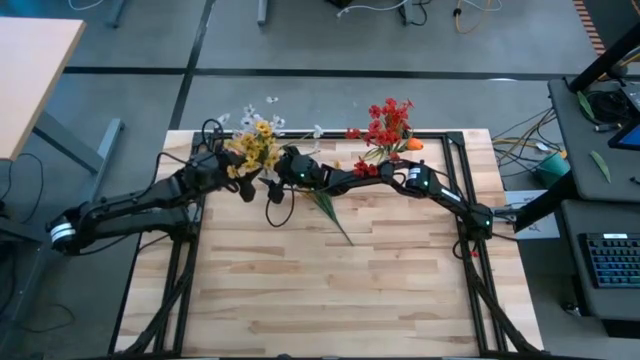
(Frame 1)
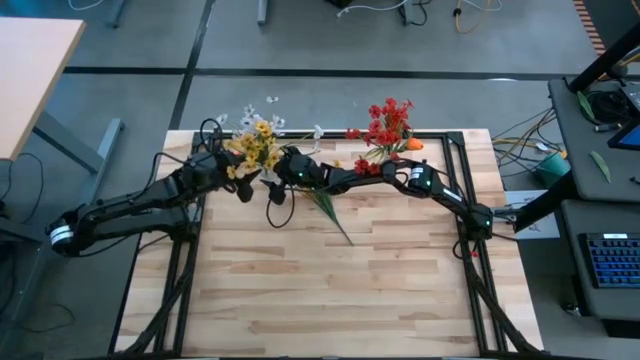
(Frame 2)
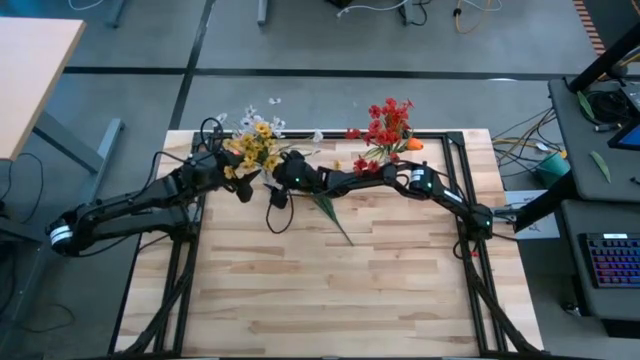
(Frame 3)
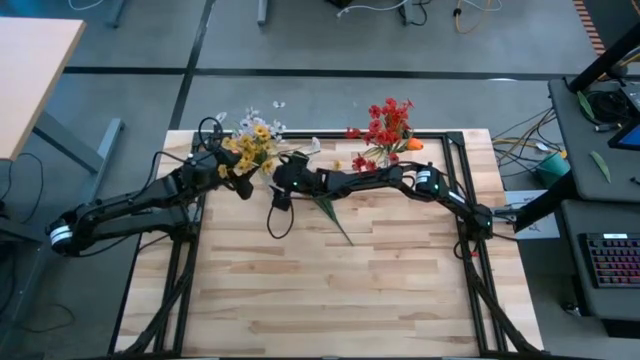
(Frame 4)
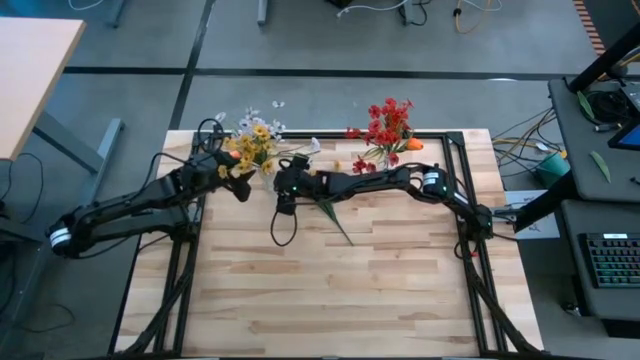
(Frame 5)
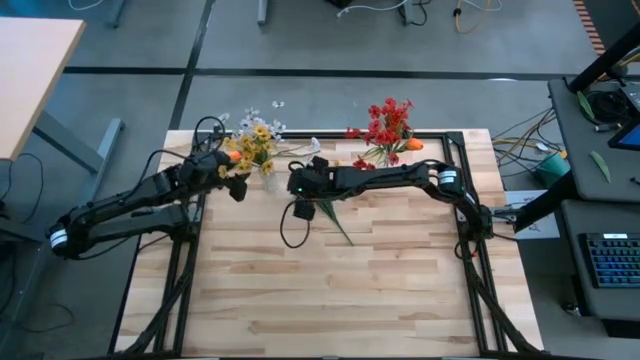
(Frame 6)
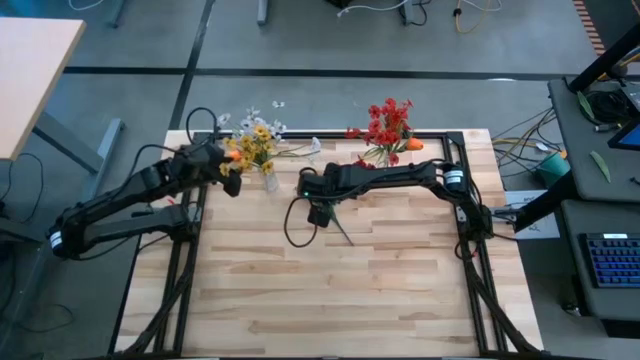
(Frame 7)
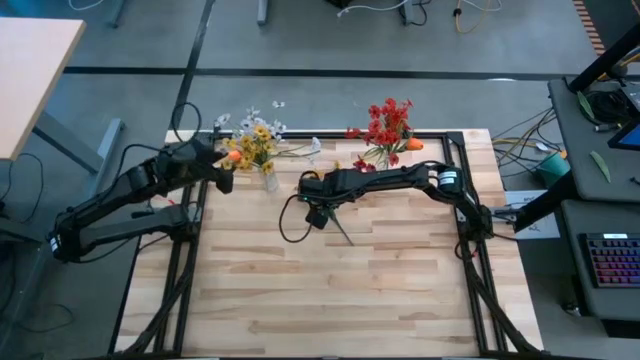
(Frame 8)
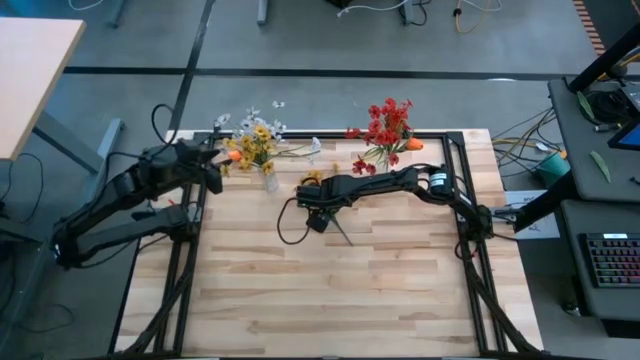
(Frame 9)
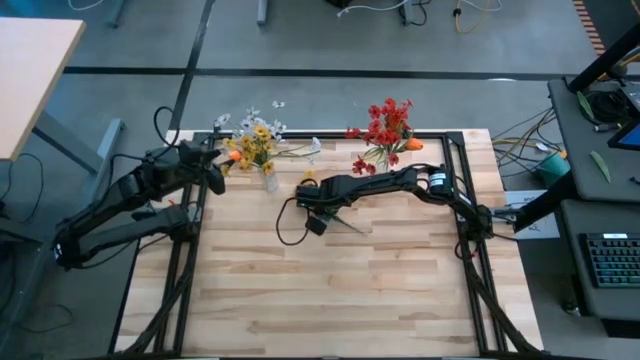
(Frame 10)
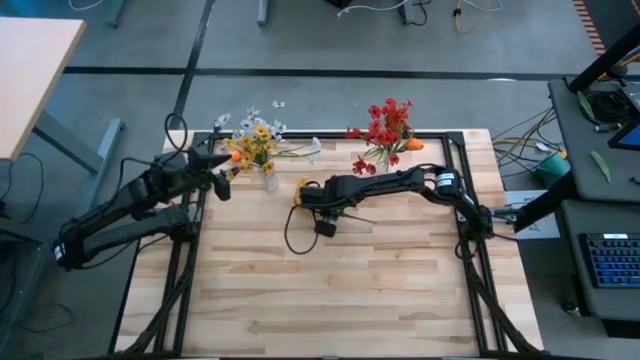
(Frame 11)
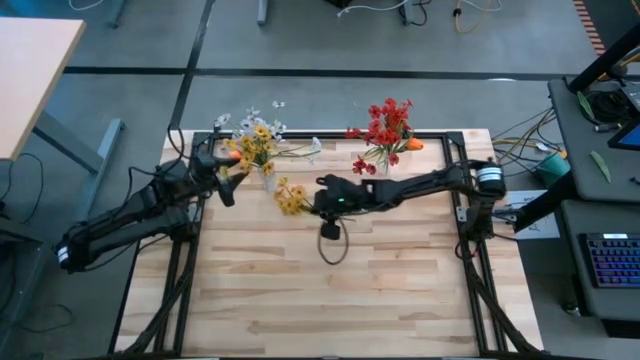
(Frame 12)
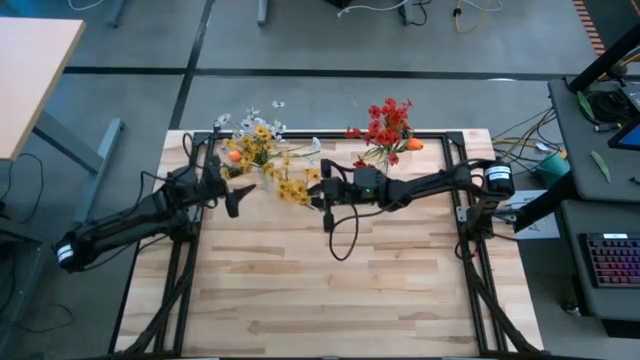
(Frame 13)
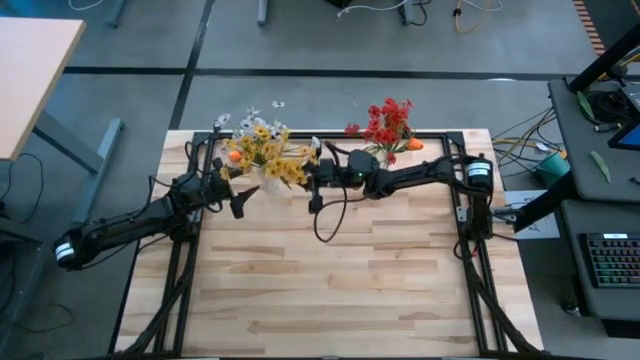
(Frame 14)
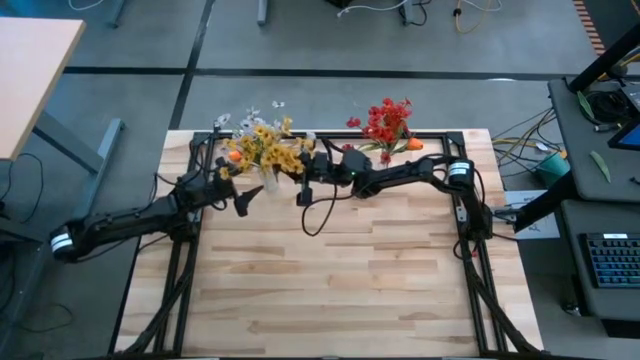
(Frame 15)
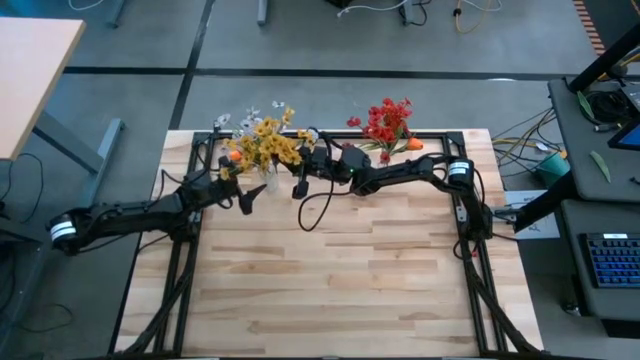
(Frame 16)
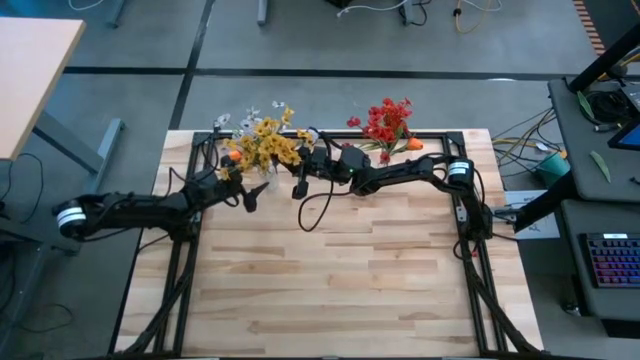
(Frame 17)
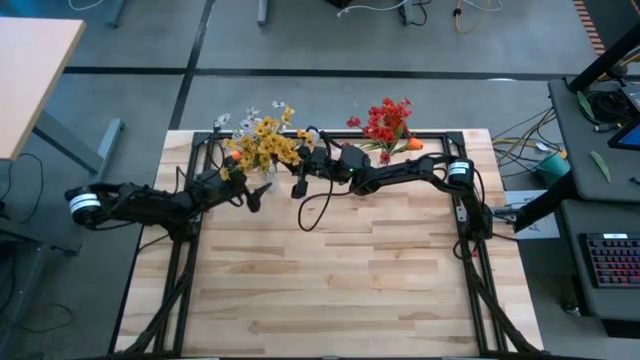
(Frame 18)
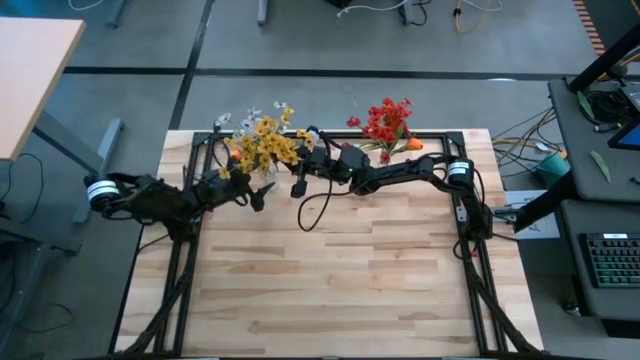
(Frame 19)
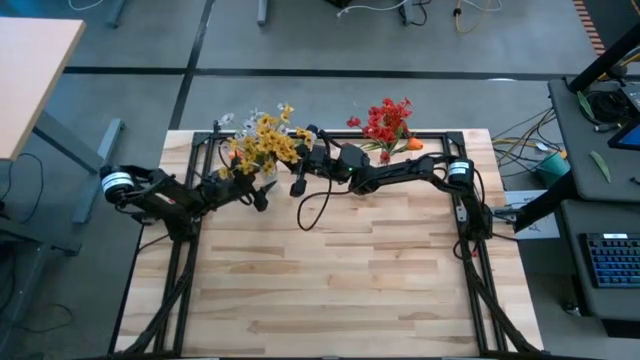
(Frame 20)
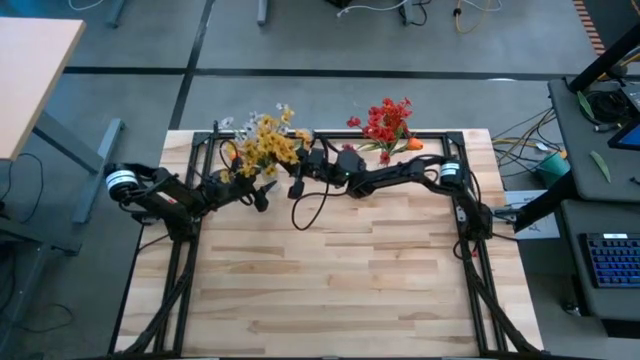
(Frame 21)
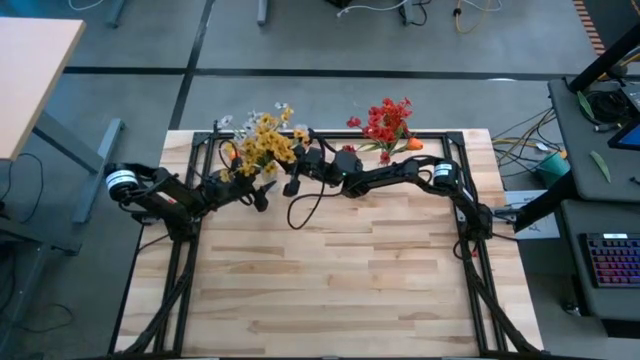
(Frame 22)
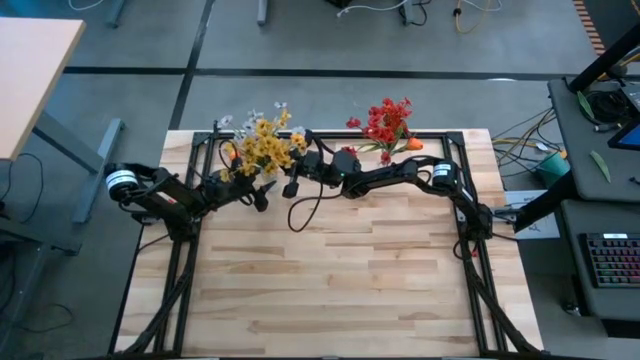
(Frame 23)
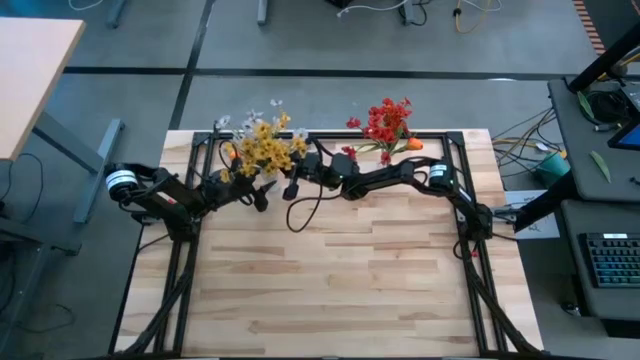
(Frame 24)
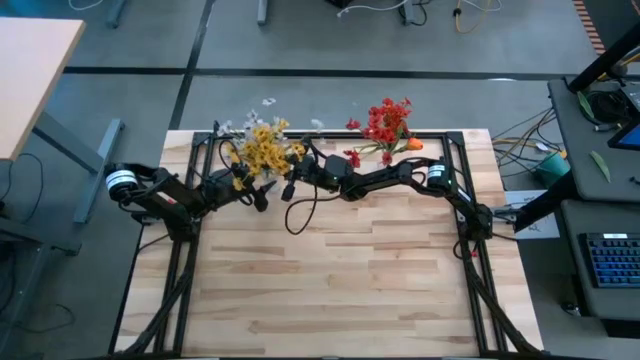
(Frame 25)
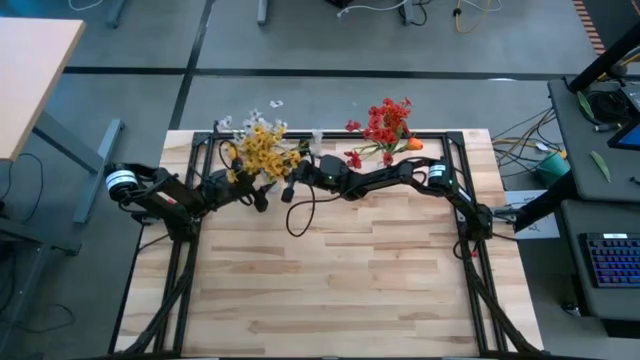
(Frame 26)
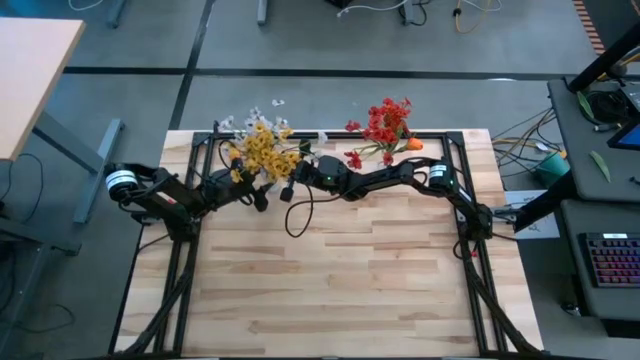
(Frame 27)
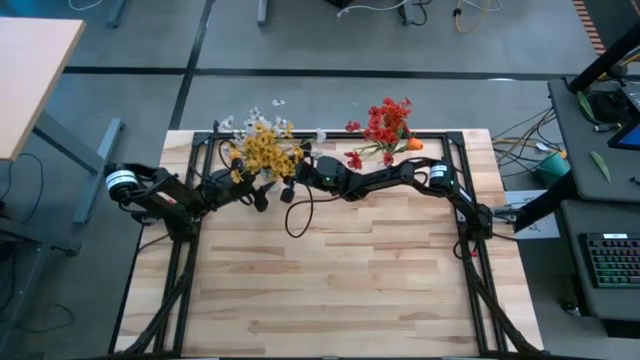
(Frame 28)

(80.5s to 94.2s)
Task: Sort flowers into vase by color
Put the yellow flowers into the left transparent flower vase

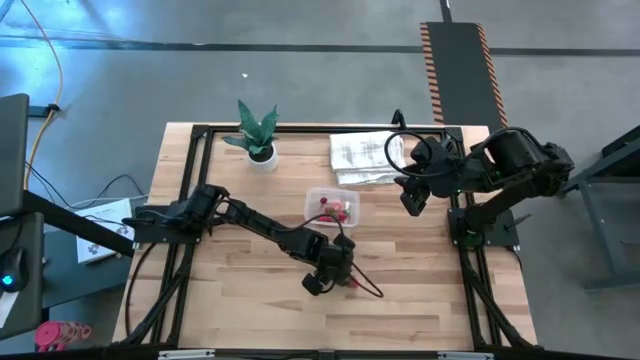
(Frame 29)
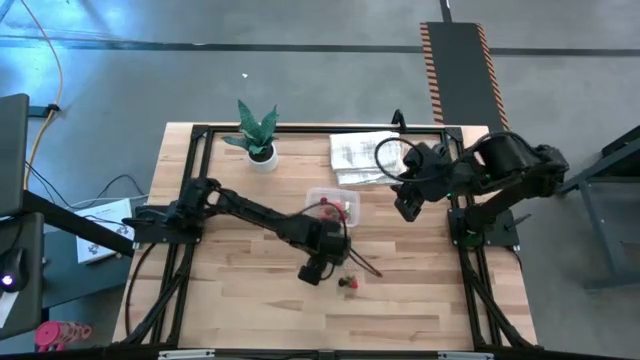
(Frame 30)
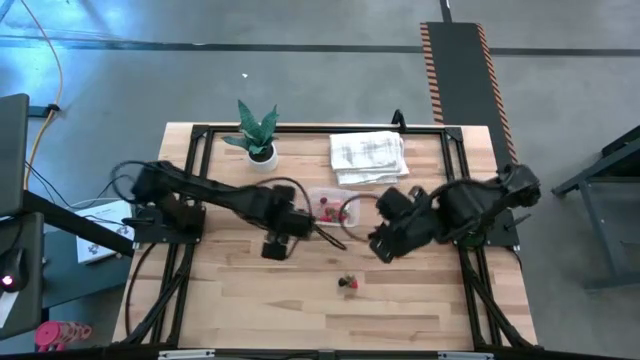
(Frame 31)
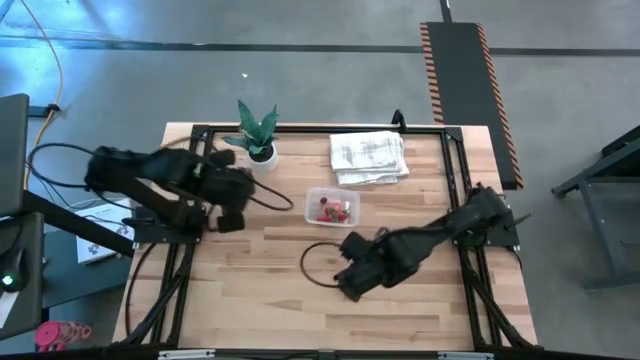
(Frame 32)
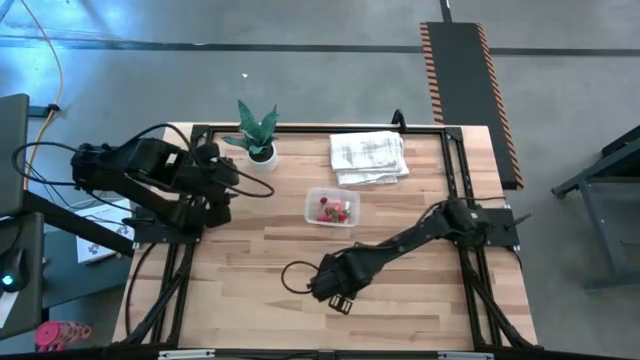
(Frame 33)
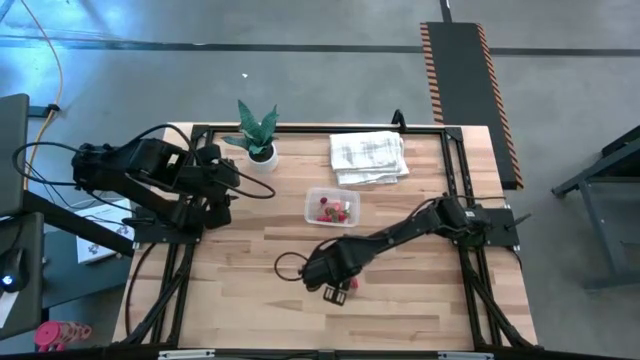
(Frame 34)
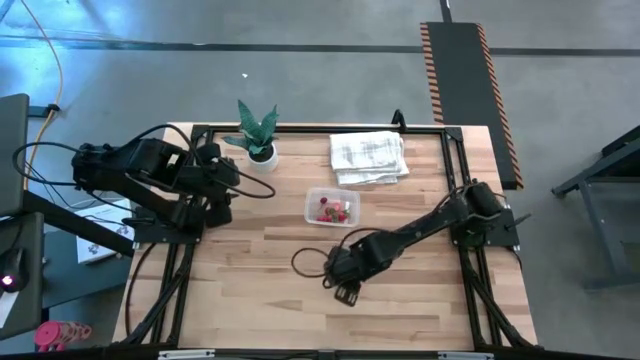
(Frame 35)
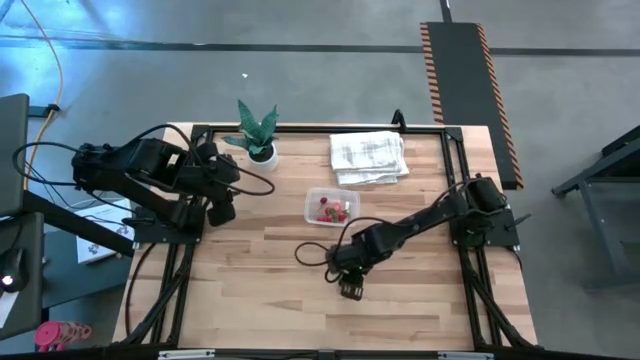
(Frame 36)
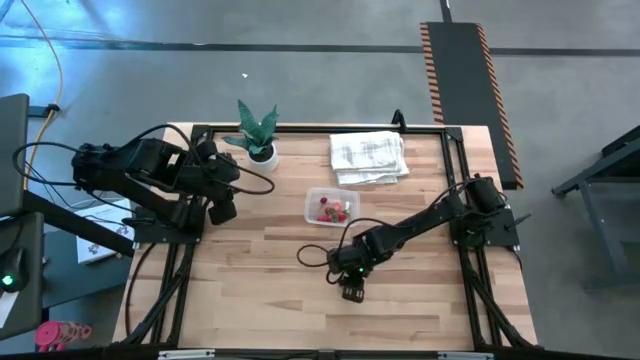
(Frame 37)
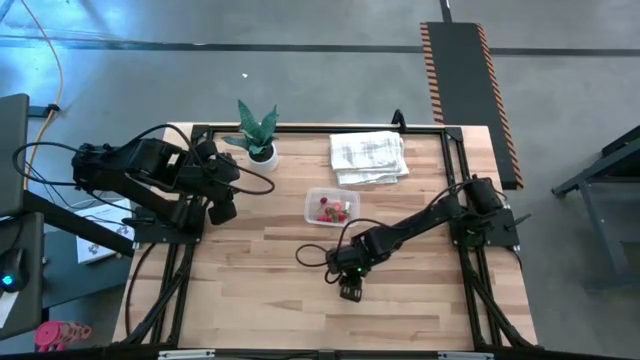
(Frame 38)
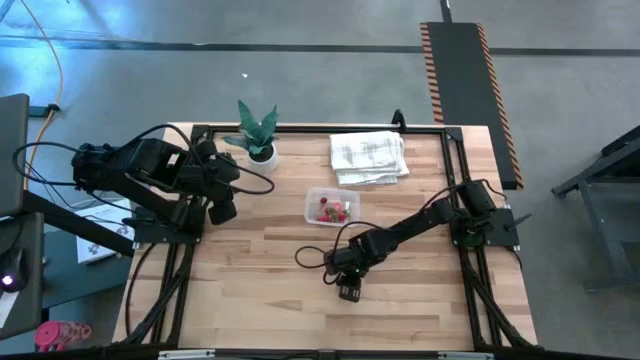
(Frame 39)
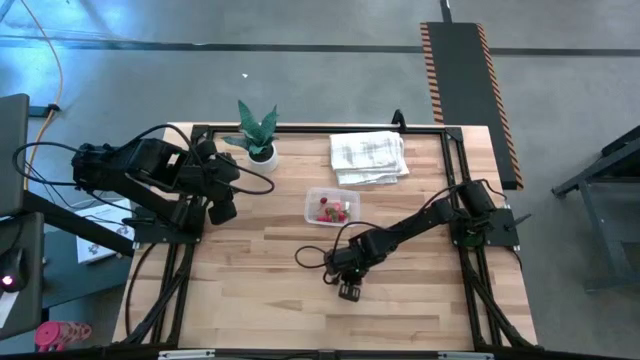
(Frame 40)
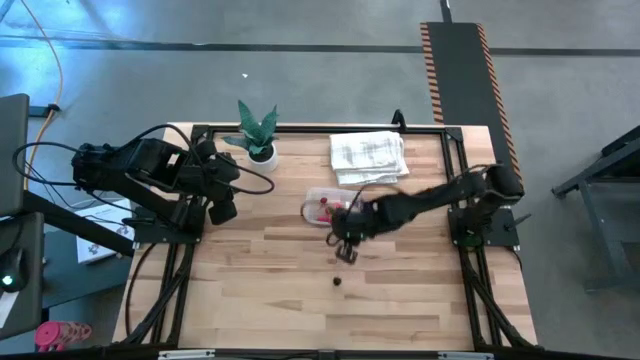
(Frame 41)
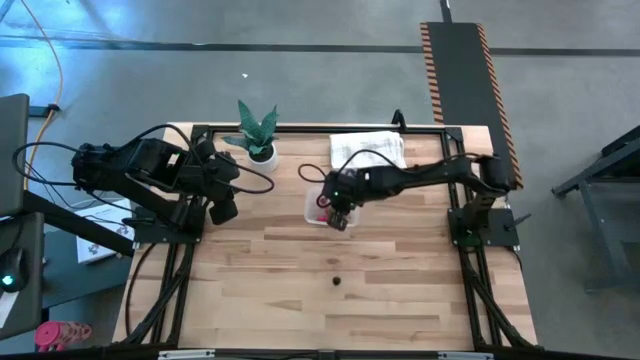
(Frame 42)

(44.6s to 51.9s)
Task: Pick and placing Produce into tupperware
Put the strawberry into the transparent bin

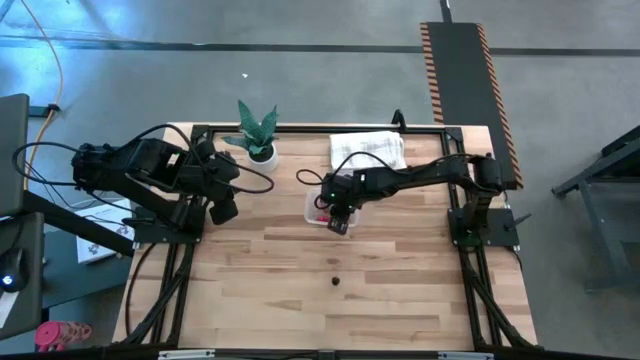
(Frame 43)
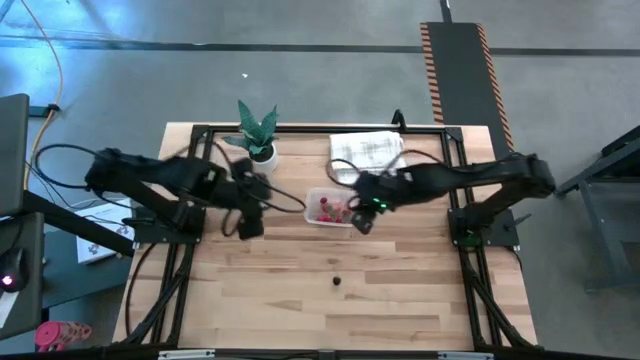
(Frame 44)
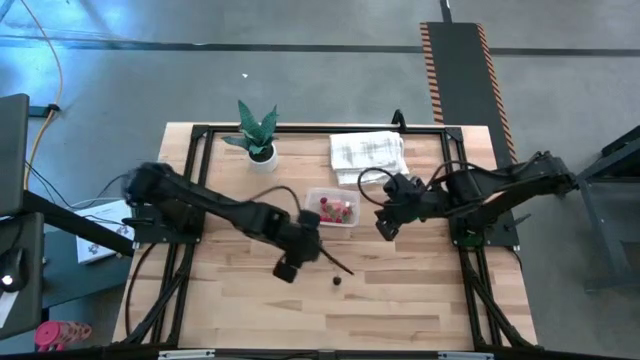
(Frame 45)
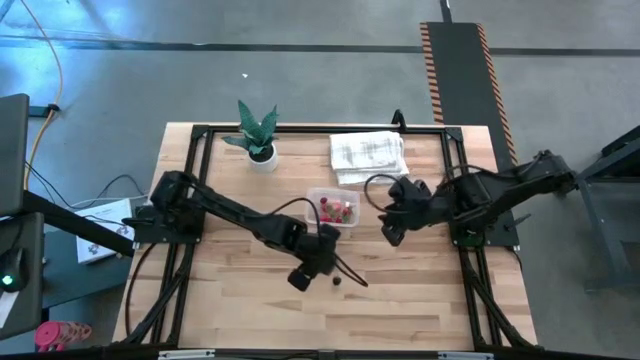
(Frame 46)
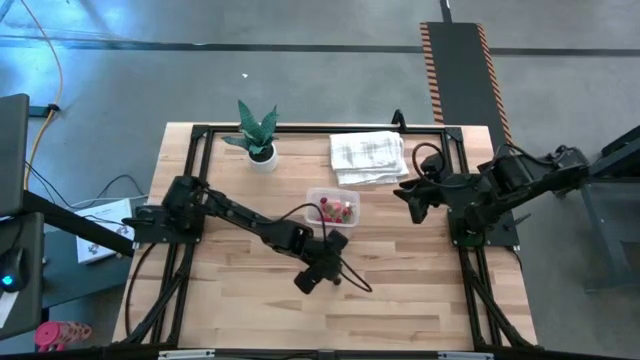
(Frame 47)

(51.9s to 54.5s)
Put the cherry into the transparent bin
